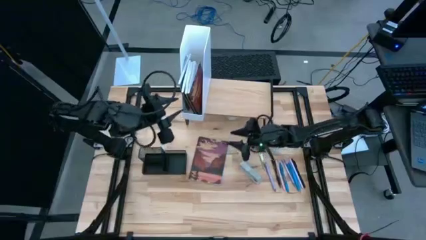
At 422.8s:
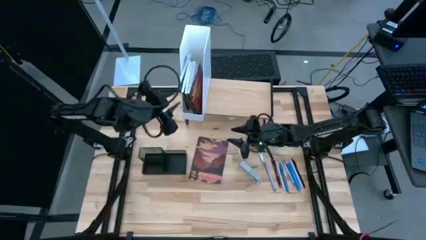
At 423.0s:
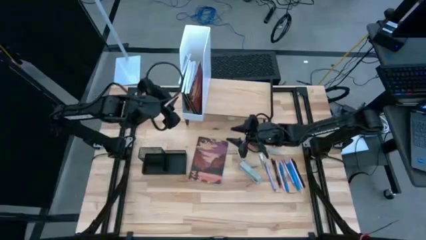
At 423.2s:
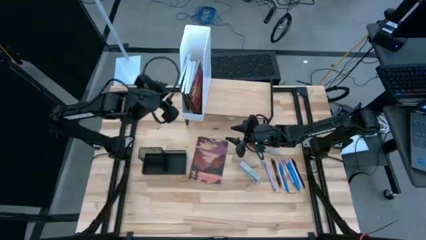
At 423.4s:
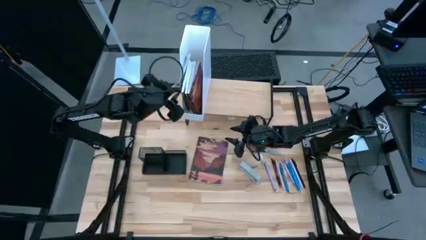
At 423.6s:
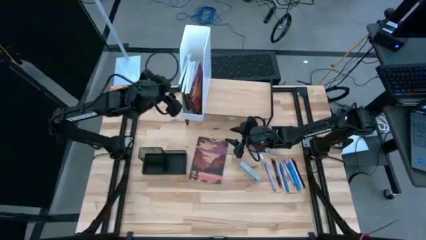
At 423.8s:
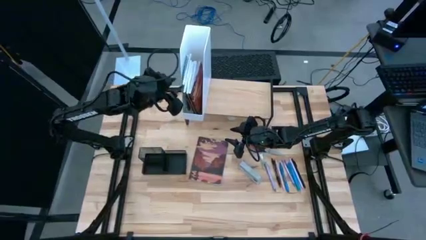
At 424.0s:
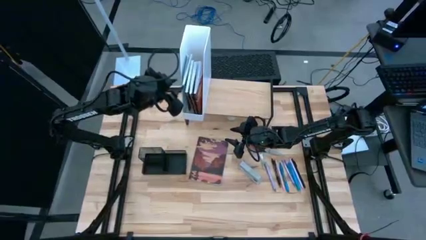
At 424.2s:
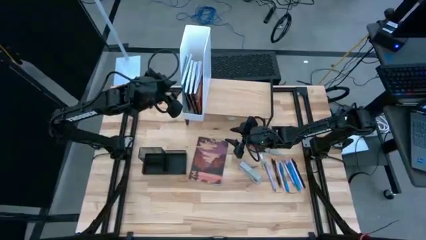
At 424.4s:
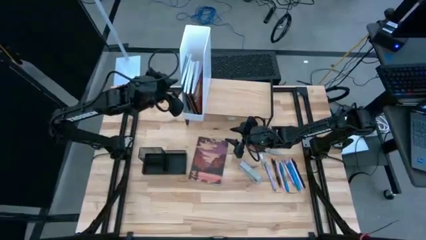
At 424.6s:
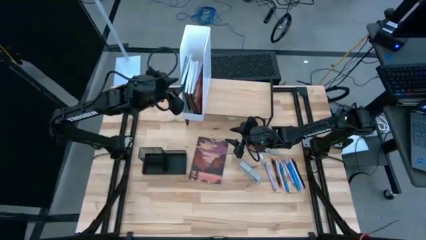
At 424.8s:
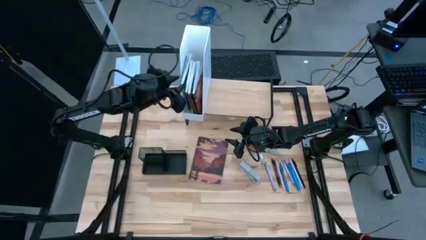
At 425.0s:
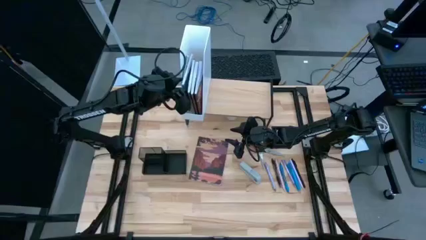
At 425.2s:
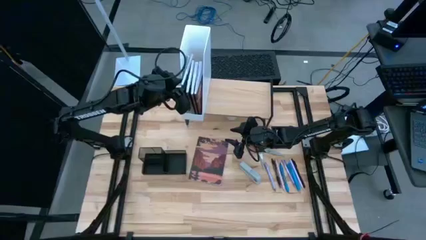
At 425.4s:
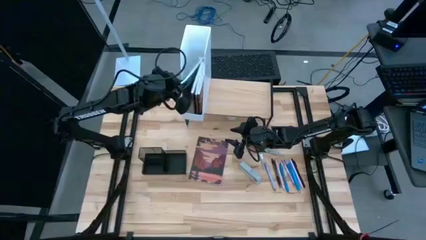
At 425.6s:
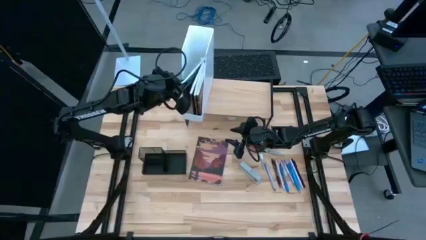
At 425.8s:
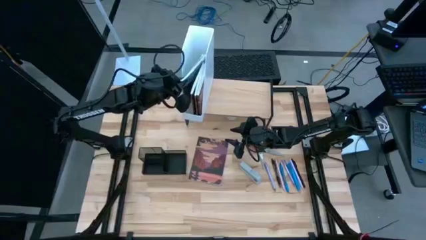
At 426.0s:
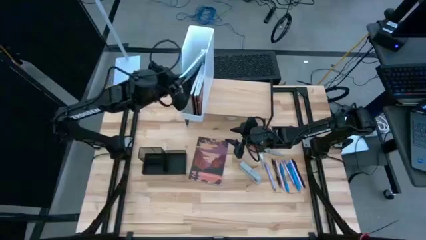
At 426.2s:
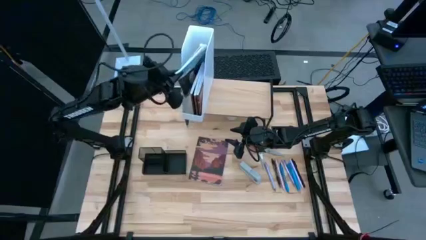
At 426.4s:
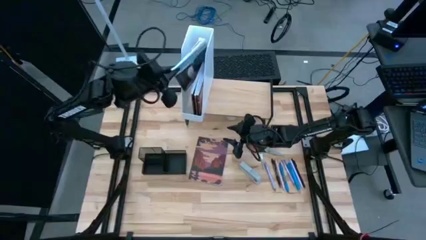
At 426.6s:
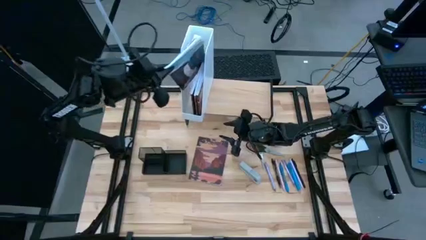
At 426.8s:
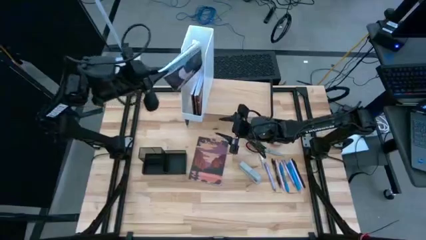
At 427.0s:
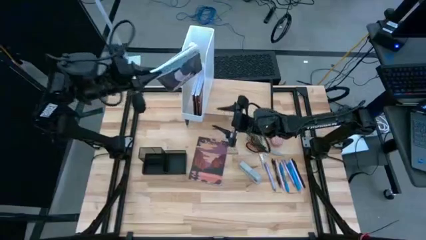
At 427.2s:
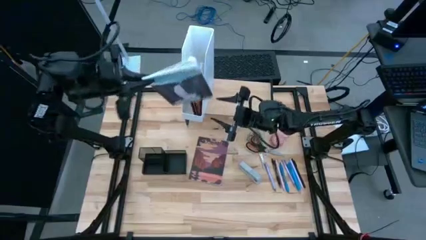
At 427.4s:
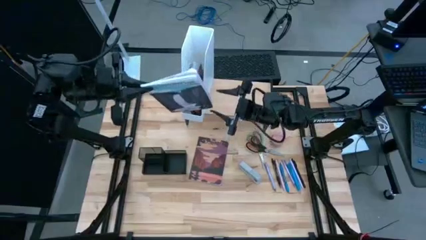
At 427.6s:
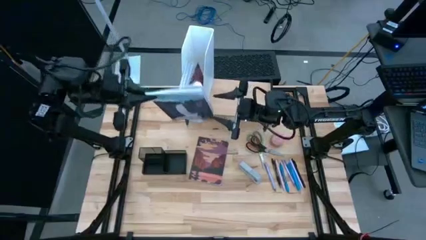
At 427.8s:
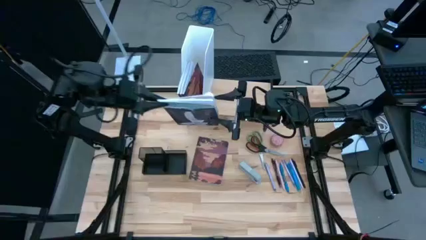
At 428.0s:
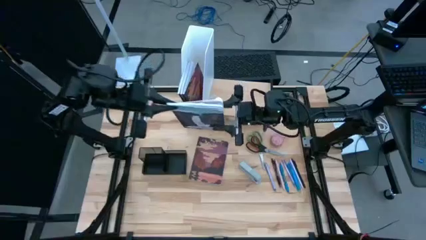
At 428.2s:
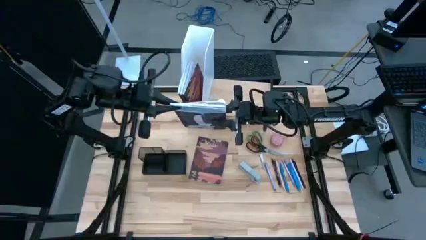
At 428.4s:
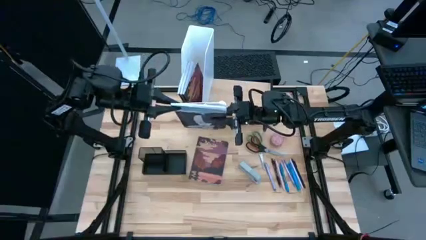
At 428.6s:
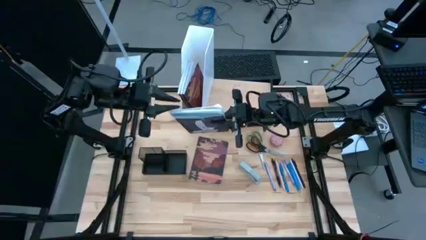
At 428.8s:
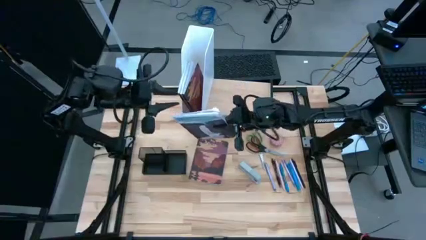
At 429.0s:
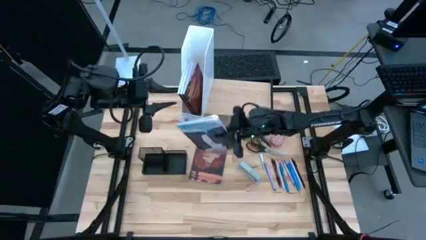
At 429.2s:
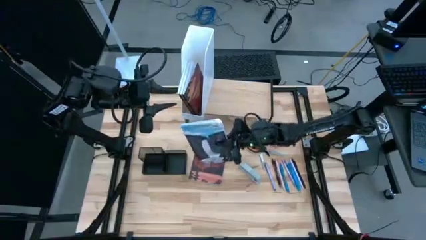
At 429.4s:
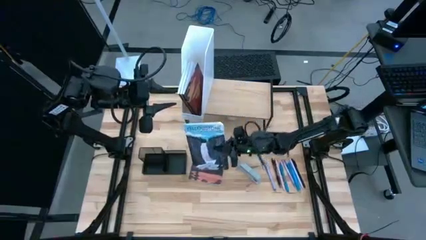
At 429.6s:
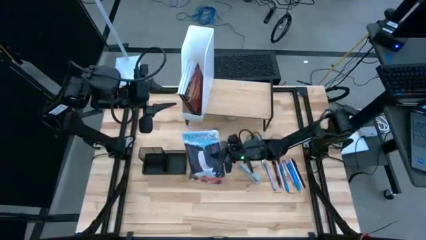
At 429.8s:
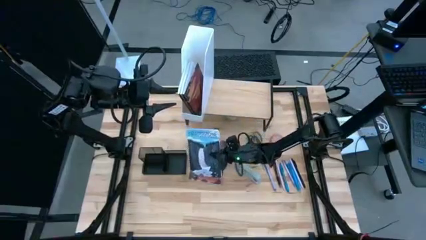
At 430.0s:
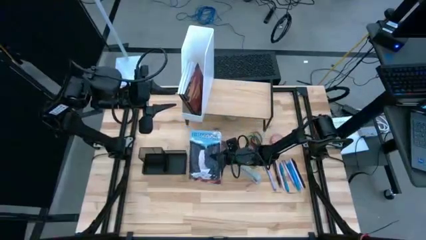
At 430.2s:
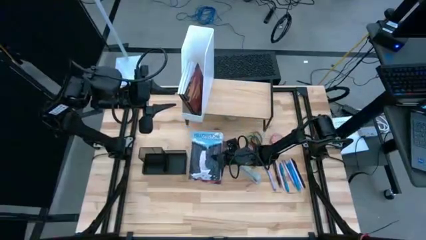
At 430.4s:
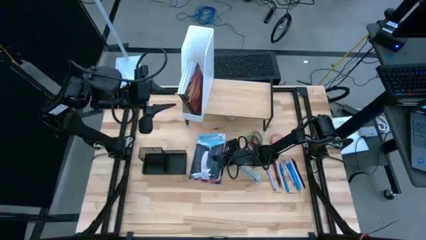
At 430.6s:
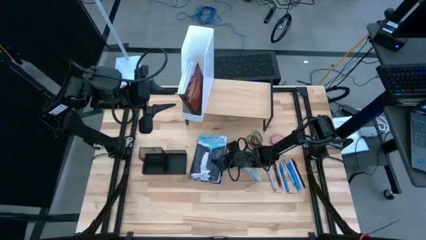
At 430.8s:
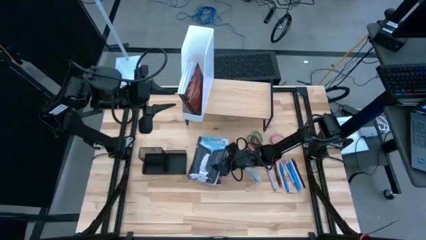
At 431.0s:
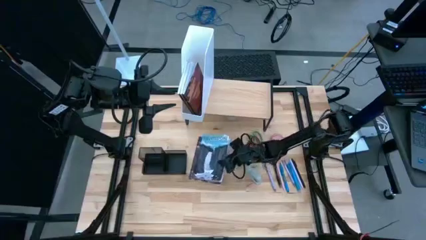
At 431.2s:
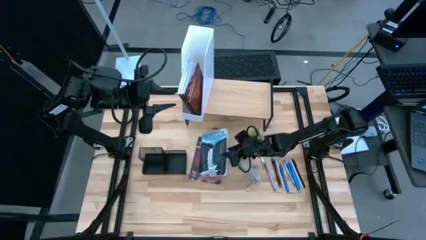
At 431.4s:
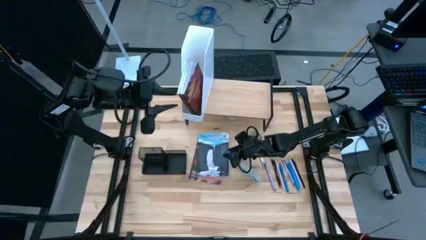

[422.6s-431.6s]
Task: Stock shelves
Remove the blue book from the white bookshelf on the shelf

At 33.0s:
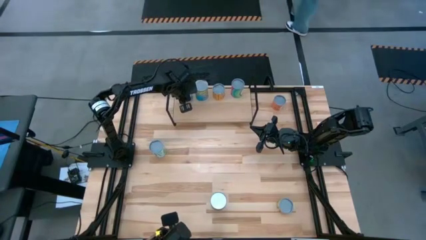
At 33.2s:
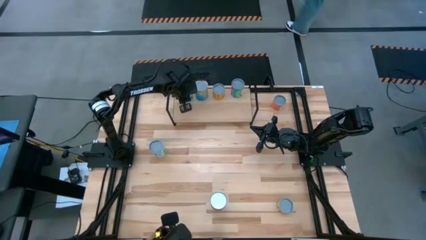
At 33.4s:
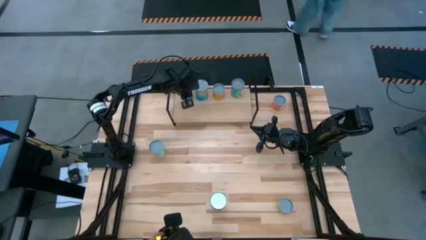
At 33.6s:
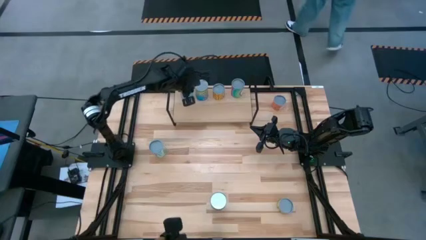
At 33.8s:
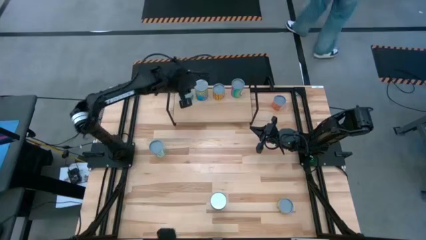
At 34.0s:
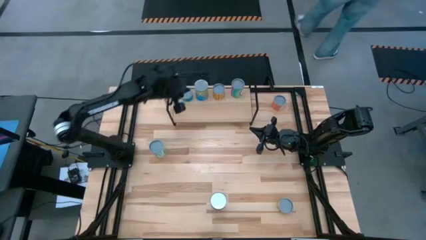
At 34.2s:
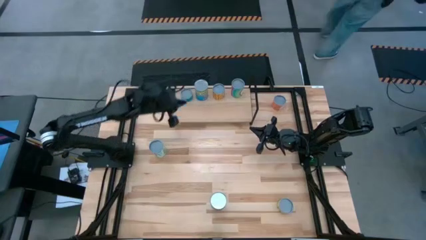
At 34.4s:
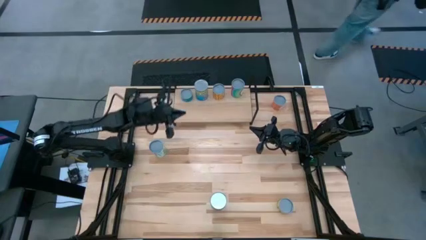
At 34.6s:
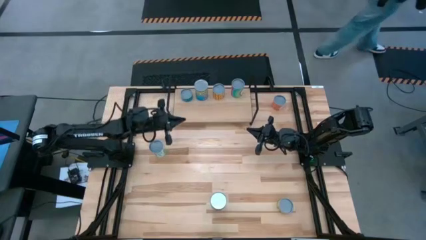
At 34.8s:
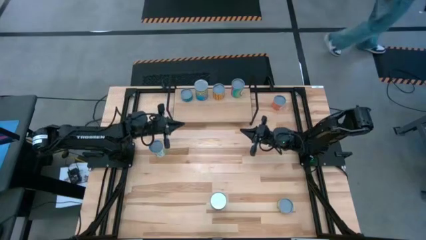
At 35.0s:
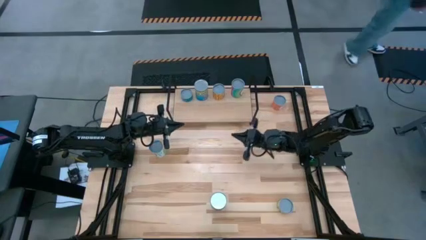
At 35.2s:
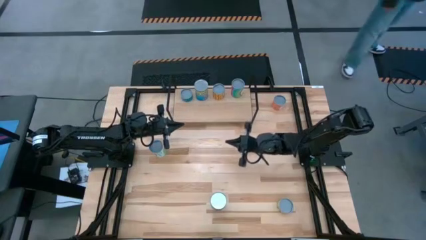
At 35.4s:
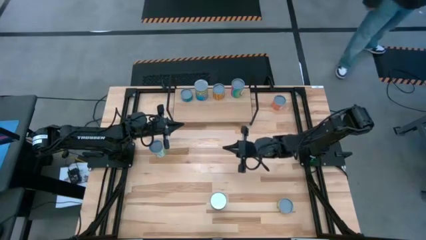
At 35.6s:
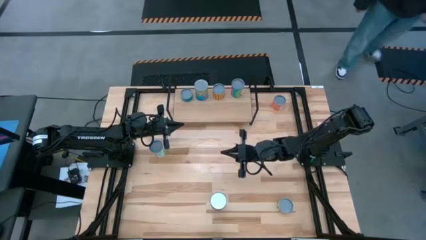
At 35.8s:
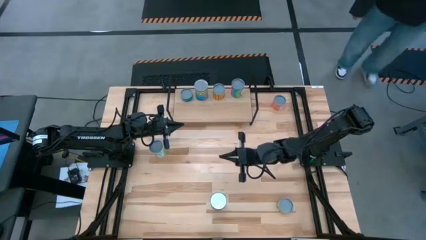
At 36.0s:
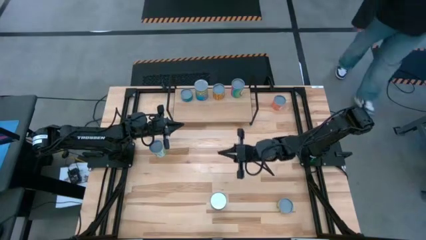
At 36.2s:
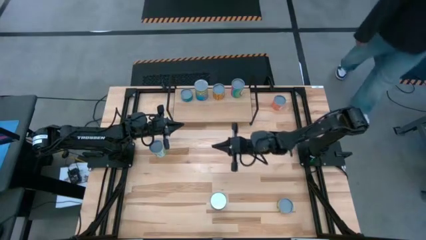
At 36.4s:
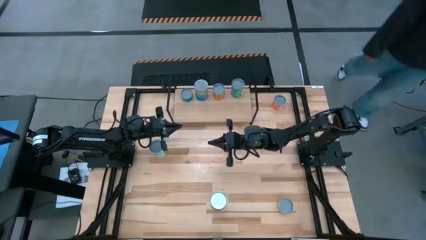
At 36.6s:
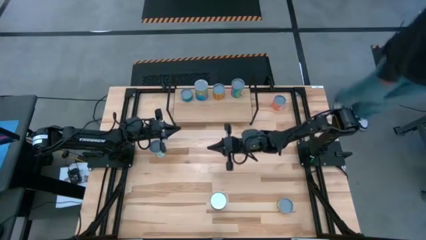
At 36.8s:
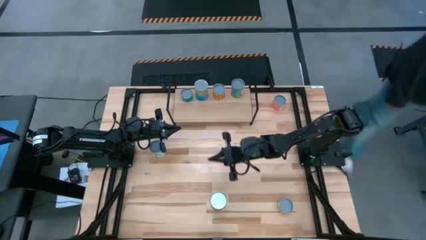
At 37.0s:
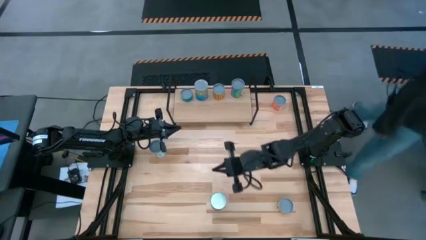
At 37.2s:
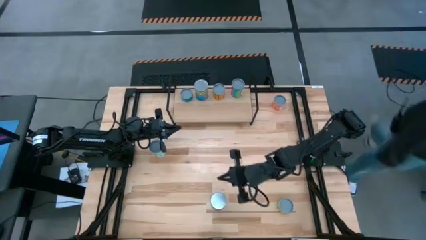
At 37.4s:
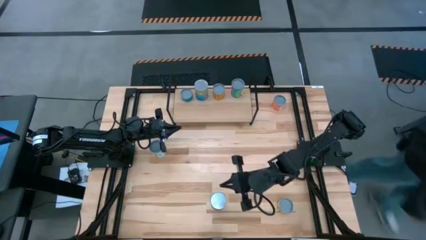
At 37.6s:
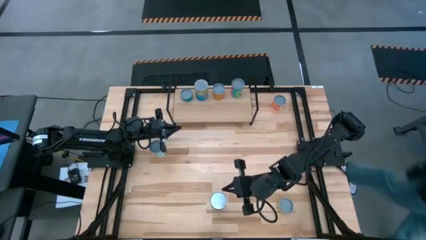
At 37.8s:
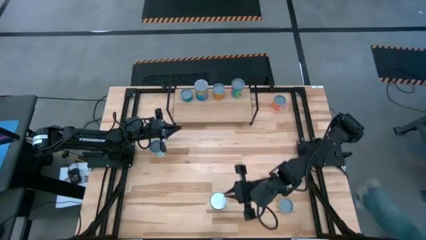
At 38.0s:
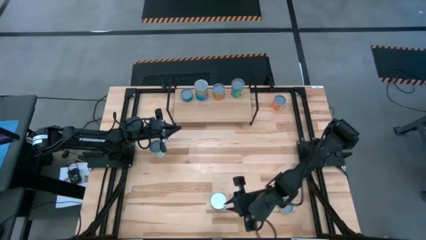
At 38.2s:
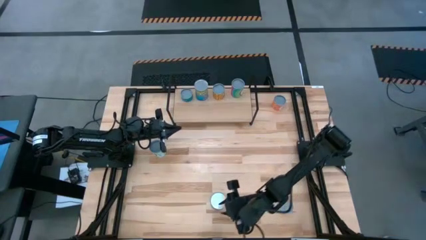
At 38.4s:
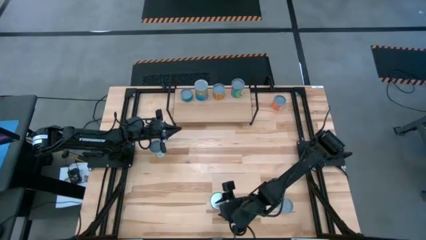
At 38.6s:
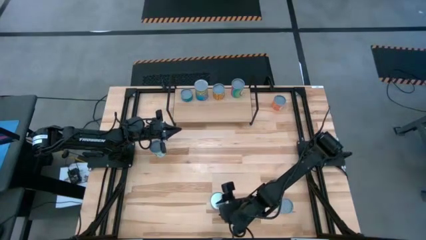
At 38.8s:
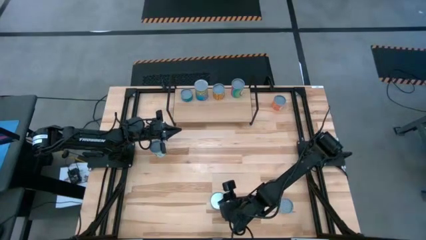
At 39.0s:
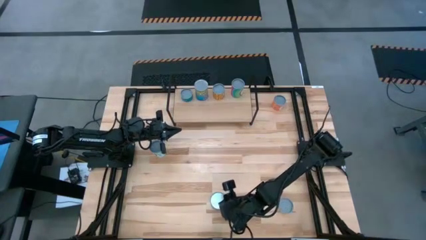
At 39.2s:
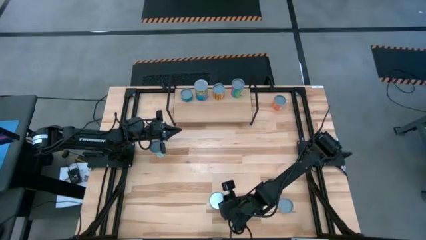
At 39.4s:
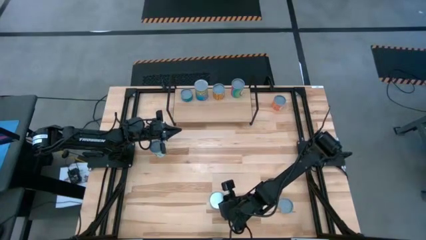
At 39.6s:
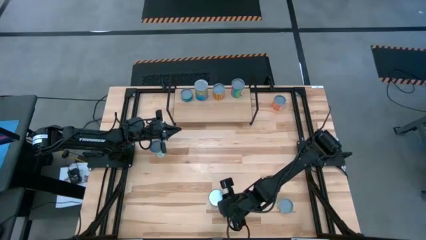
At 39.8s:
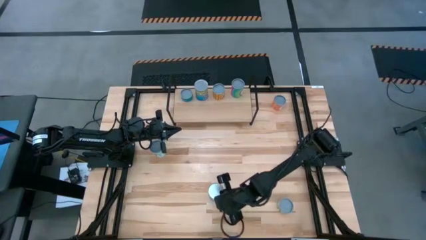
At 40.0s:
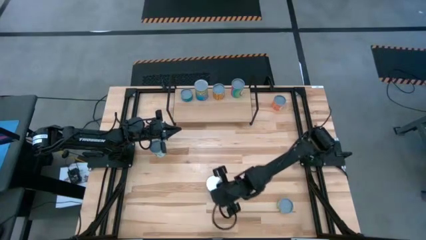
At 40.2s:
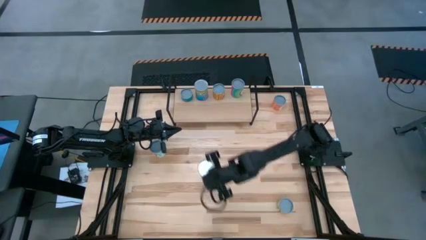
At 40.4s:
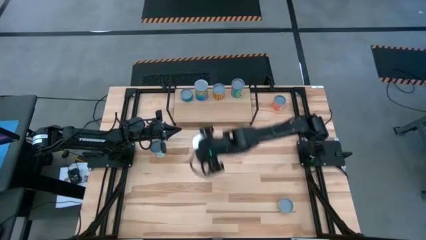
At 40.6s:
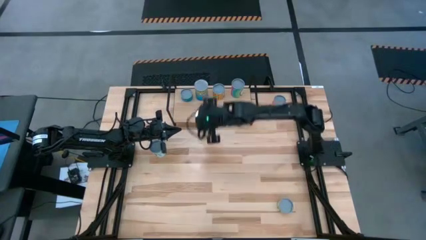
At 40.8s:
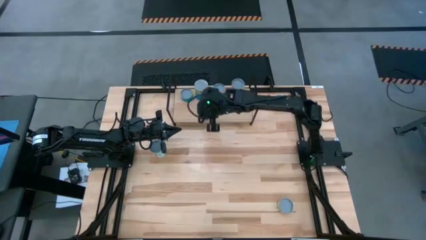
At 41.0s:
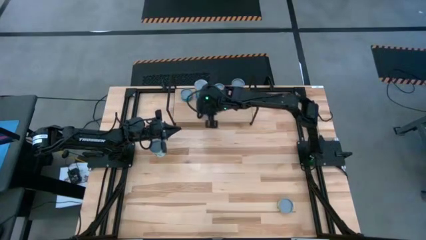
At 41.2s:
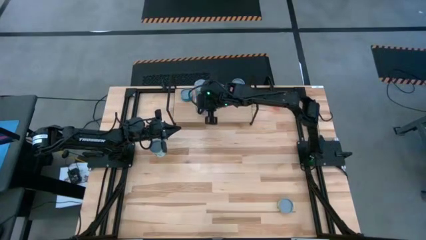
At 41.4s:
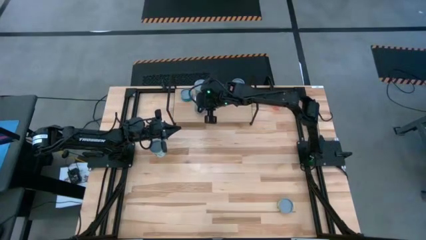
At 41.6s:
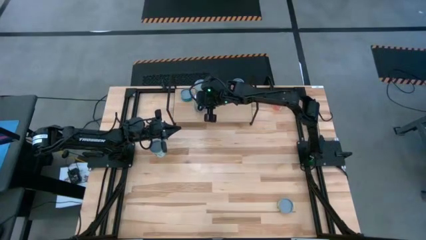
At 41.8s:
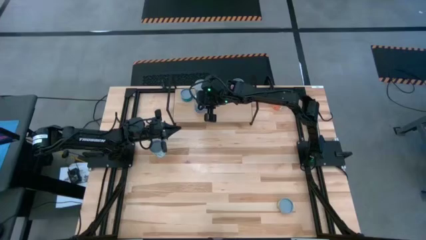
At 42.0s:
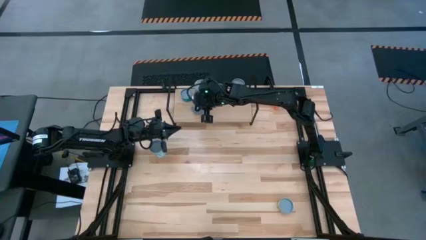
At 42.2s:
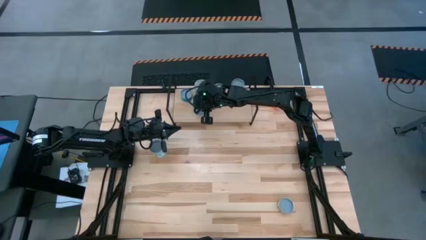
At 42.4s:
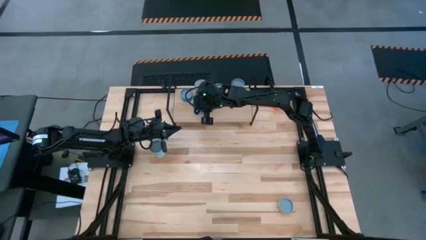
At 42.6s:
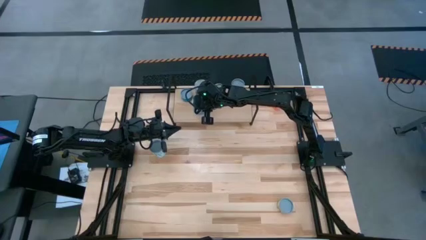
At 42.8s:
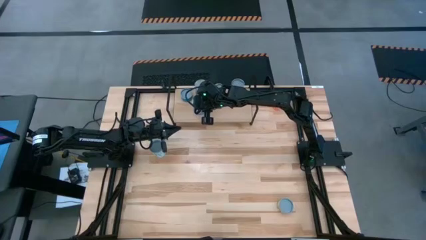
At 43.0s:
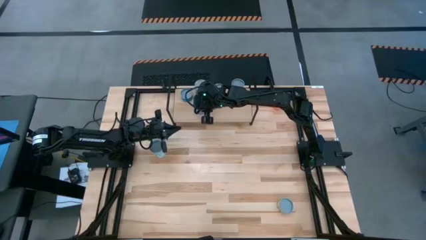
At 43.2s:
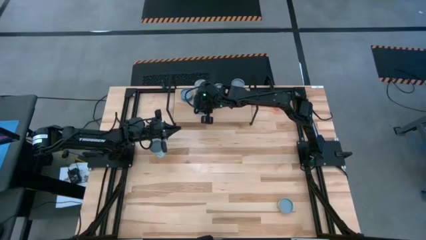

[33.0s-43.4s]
Task: Pick and place cans onto a shelf
Put the canned cherries on the shelf
